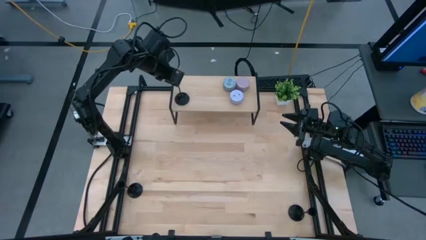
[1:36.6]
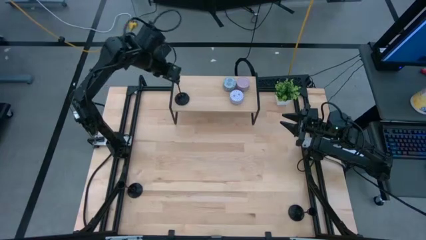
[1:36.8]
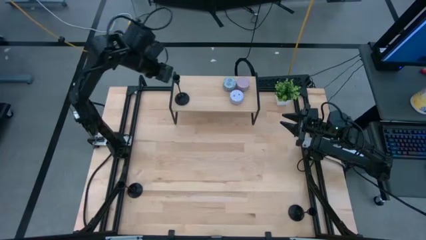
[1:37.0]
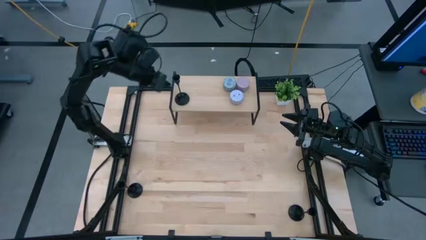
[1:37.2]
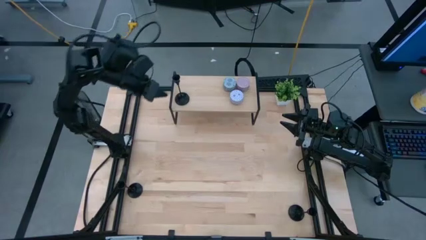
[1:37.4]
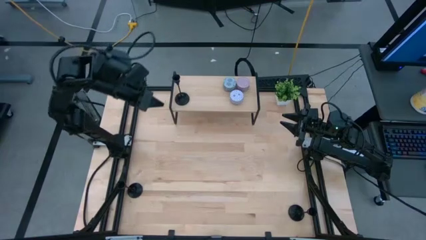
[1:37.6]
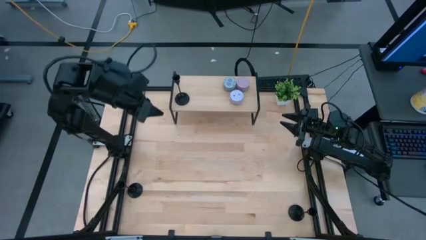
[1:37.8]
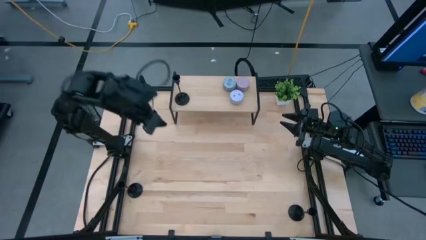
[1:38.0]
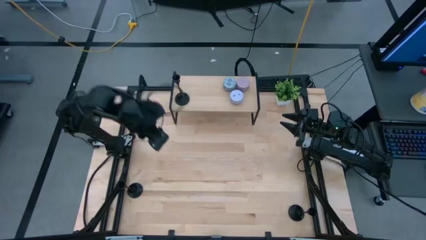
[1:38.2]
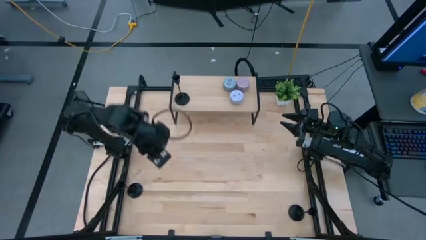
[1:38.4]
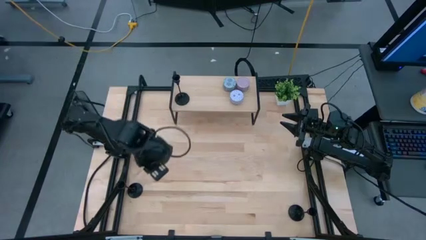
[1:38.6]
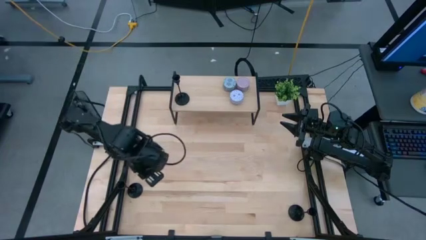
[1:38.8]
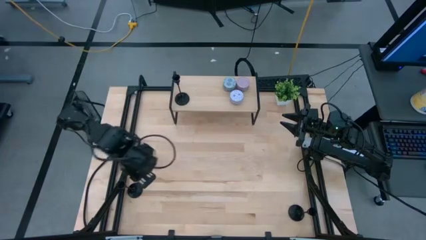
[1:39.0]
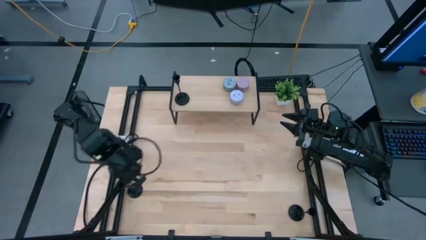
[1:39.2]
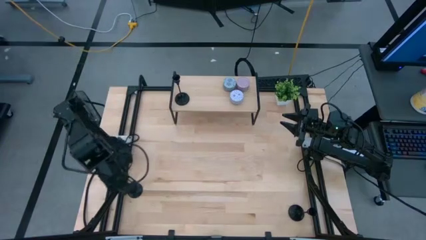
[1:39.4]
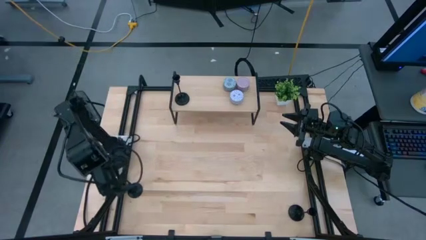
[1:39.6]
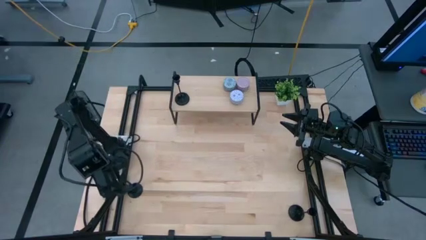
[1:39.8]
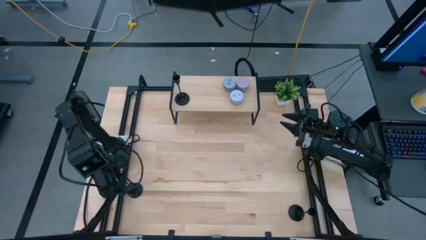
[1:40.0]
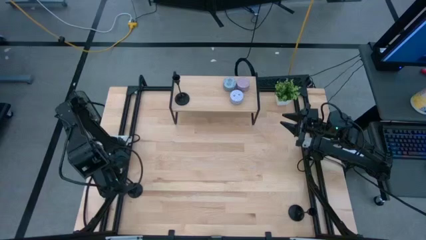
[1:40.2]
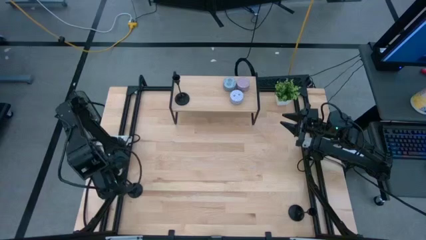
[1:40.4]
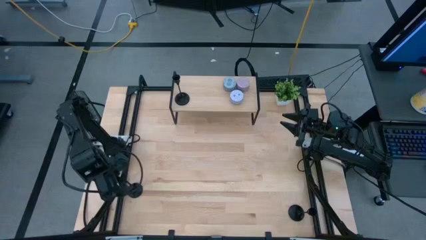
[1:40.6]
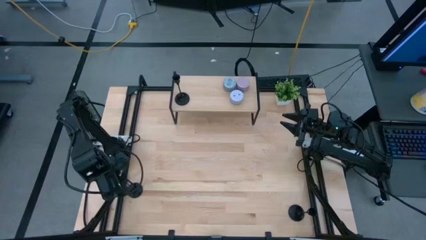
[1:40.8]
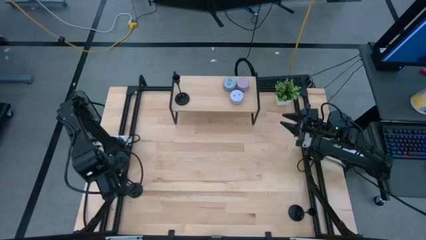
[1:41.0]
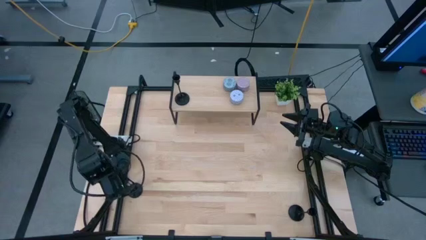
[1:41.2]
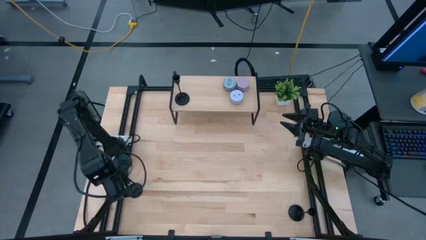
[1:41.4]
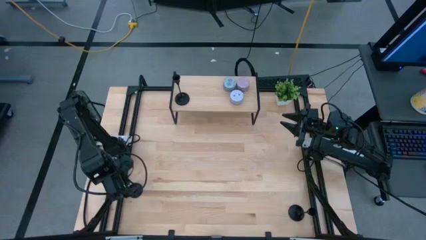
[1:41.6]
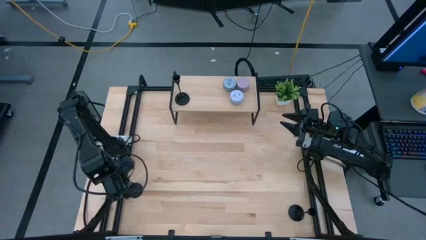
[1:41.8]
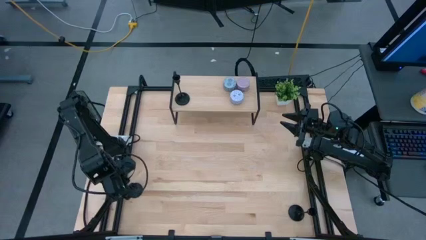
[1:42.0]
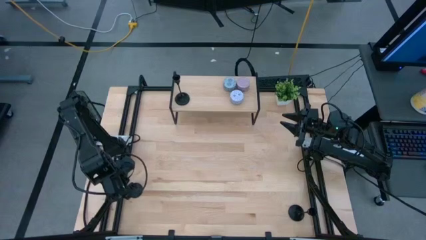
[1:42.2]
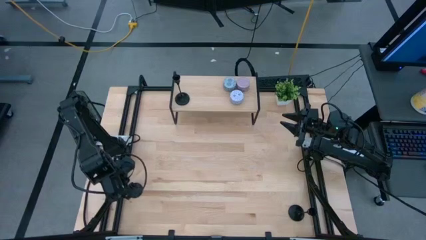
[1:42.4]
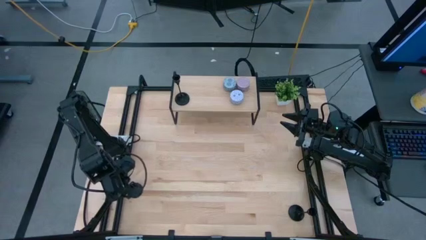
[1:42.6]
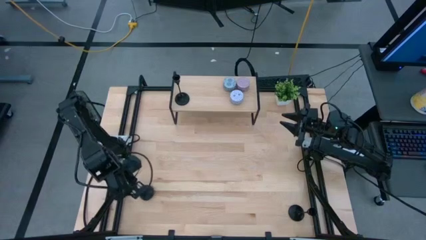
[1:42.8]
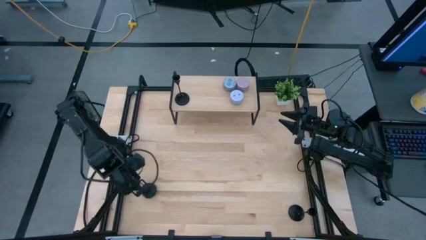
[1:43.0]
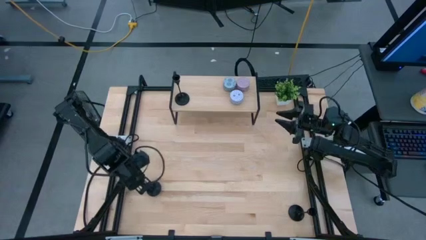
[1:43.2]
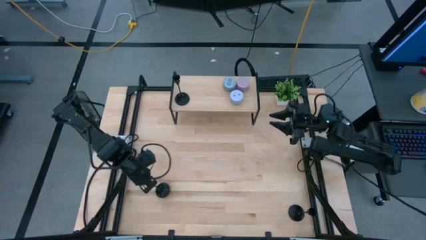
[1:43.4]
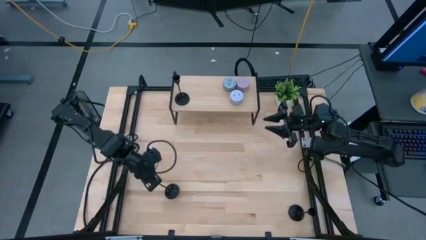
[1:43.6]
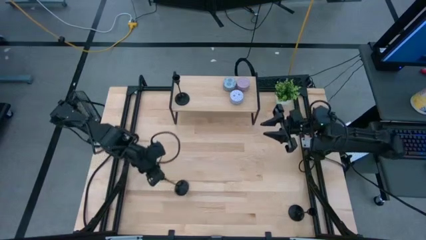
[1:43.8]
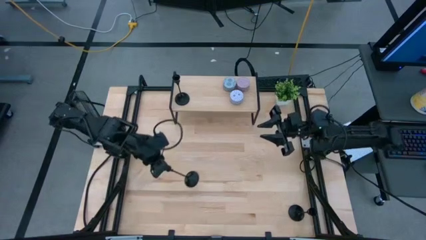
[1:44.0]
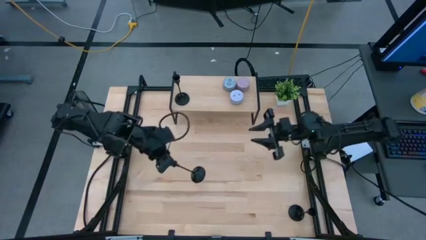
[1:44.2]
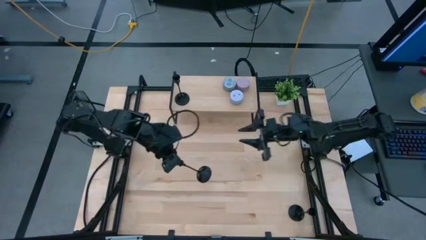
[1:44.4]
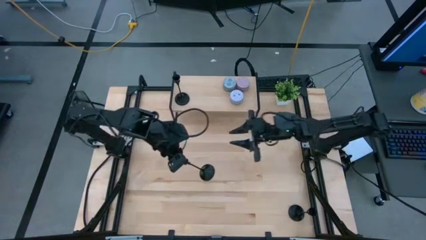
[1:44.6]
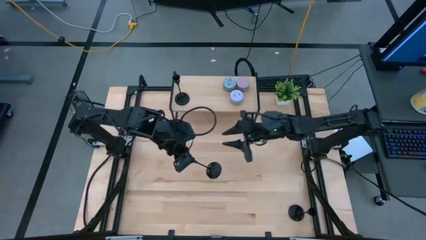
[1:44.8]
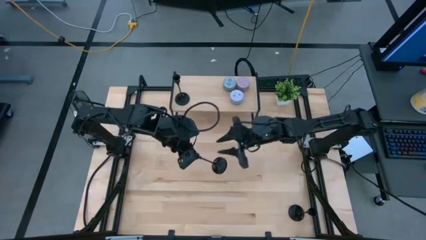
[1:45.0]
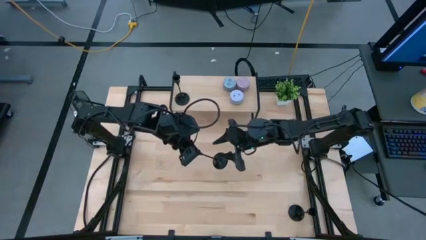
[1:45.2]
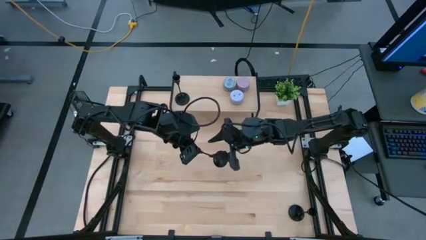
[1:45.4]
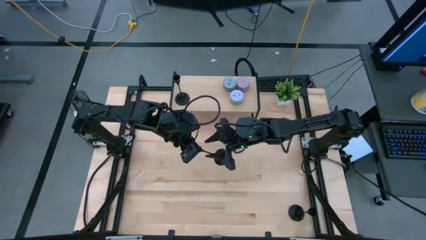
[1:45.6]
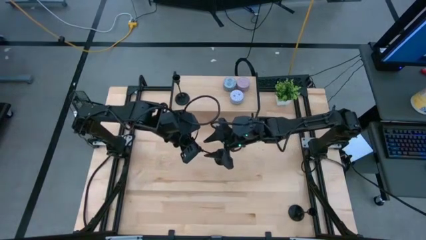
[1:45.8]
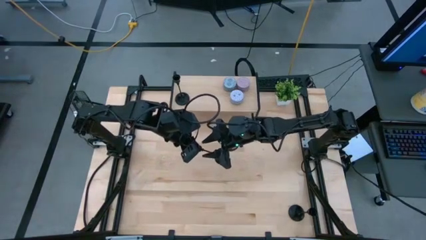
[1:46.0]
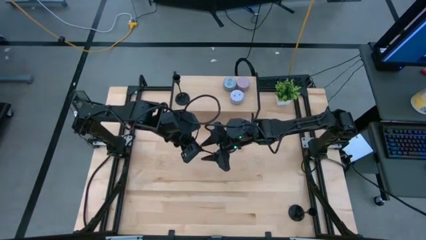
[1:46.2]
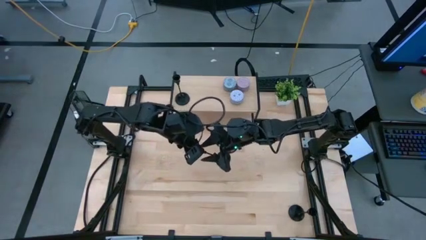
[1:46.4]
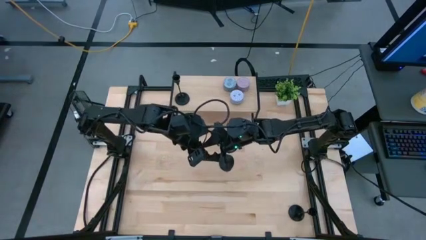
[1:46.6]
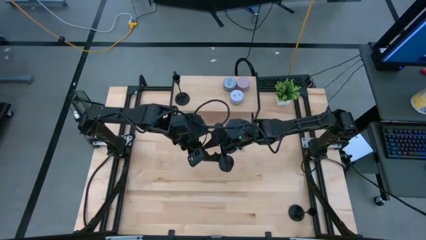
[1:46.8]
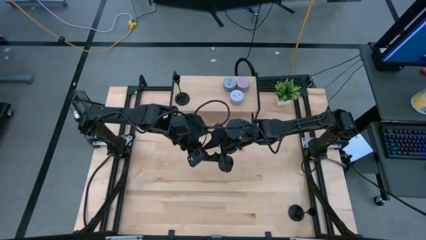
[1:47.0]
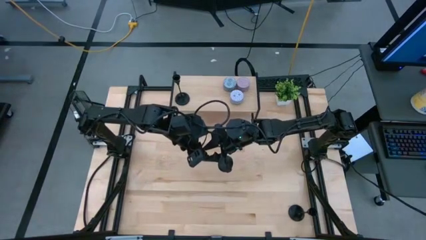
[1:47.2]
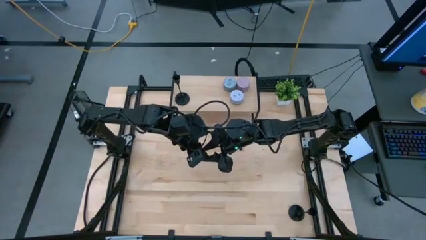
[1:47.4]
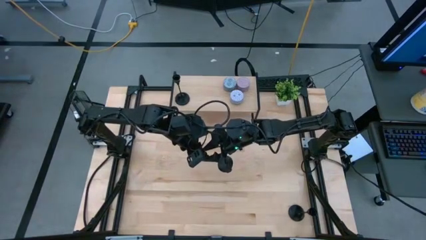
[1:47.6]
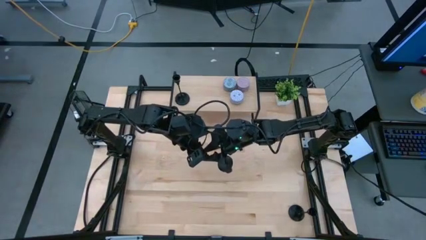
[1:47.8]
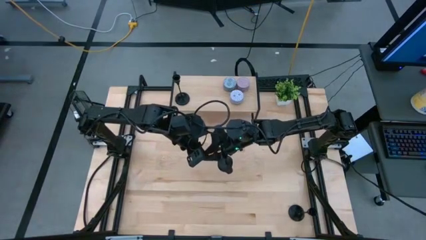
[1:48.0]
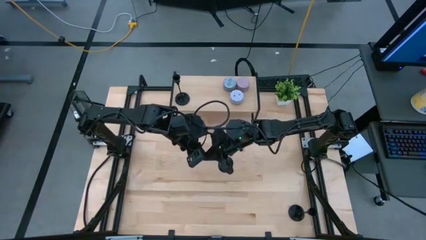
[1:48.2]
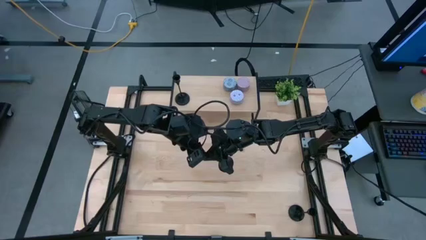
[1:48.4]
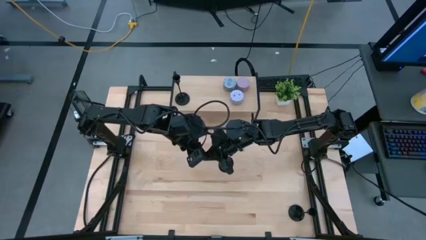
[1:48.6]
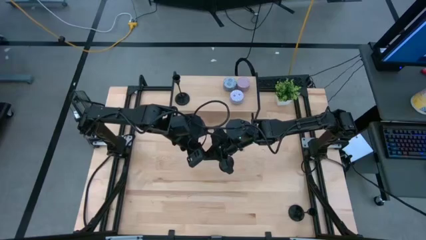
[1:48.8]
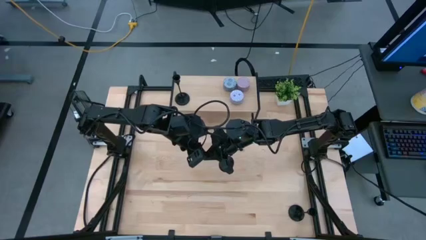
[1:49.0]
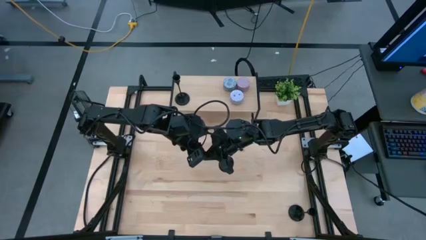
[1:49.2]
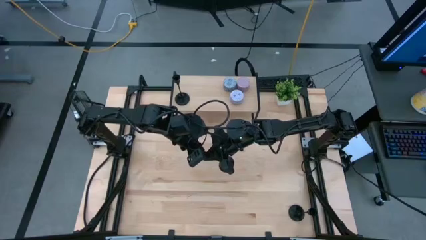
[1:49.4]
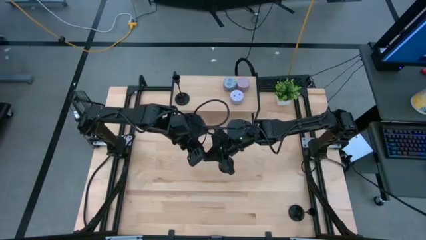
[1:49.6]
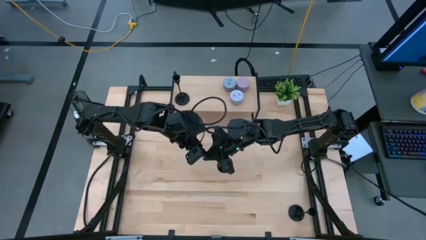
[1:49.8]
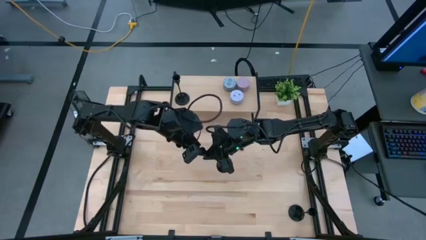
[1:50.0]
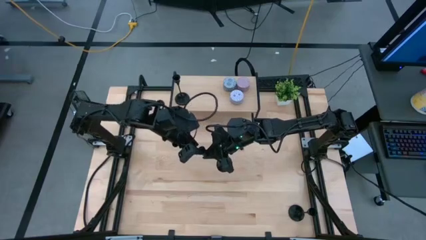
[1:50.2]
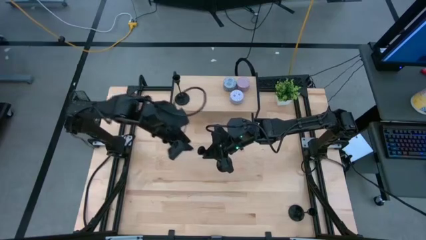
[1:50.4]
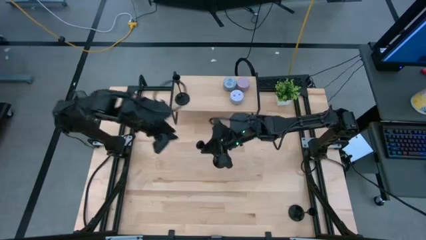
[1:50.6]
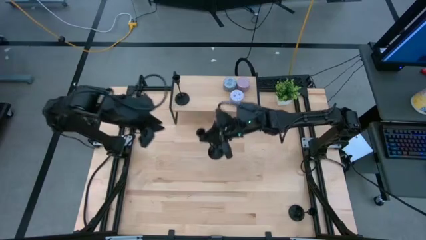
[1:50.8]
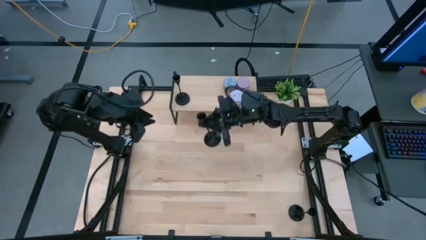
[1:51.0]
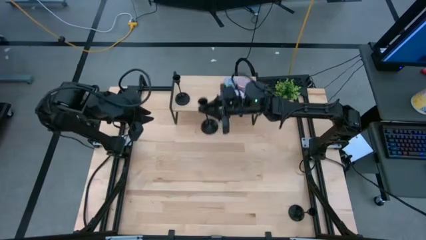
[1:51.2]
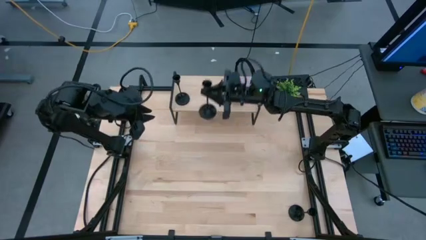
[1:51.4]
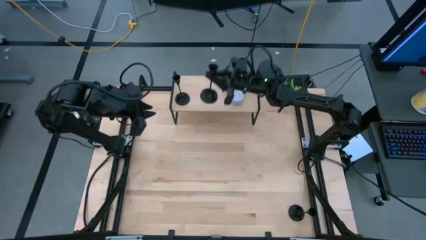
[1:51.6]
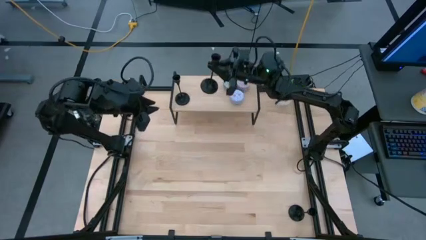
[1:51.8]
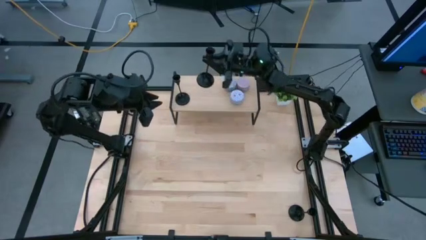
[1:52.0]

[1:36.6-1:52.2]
Task: Pick & Place candle stick holders
Put the top black candle holder on the shelf
